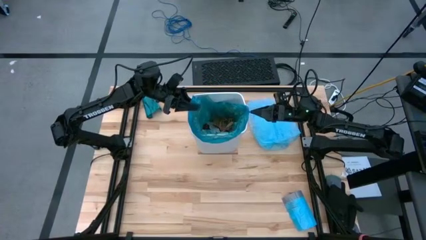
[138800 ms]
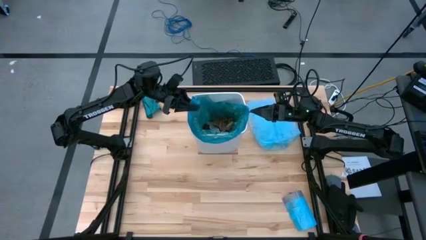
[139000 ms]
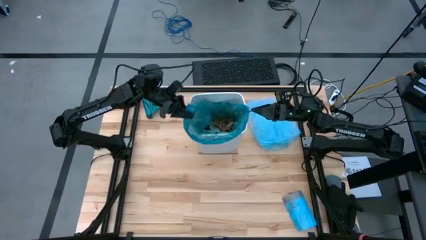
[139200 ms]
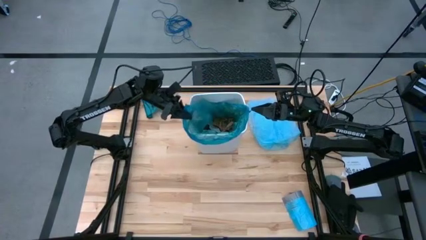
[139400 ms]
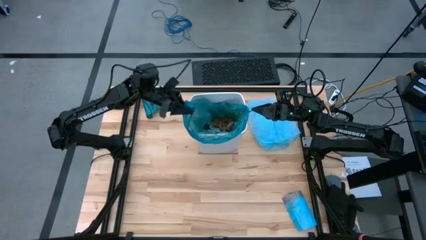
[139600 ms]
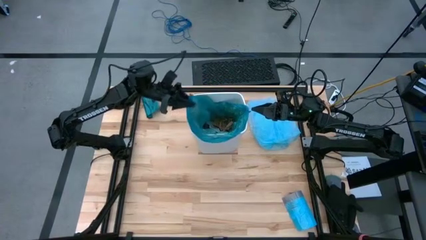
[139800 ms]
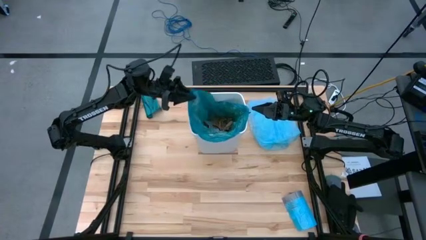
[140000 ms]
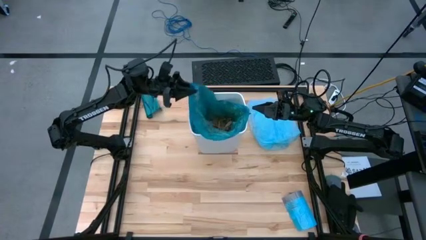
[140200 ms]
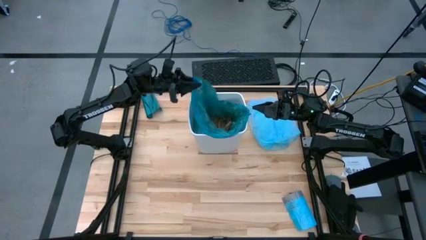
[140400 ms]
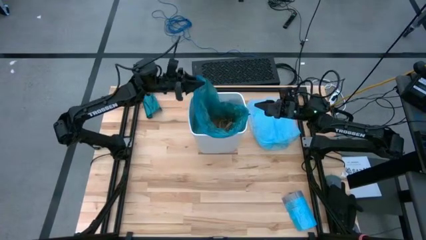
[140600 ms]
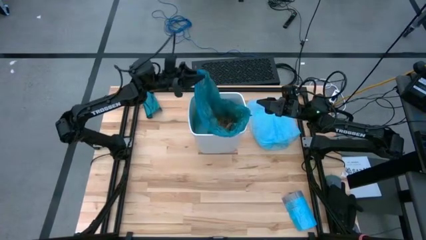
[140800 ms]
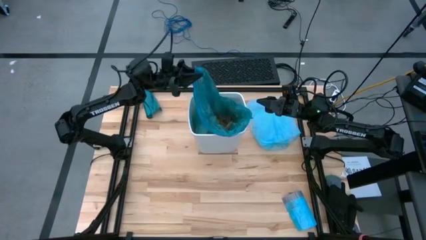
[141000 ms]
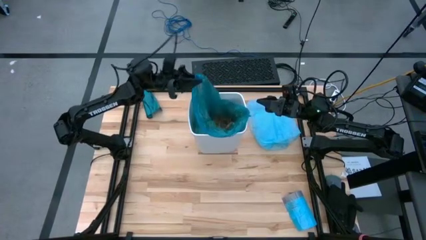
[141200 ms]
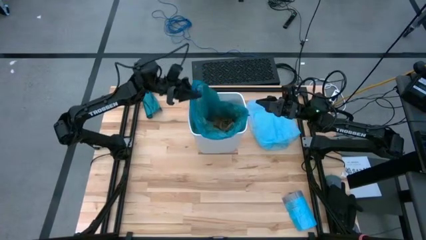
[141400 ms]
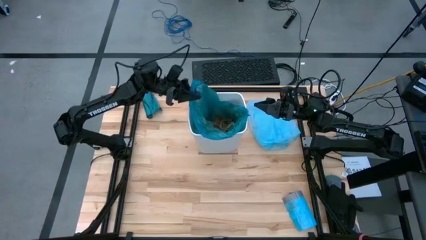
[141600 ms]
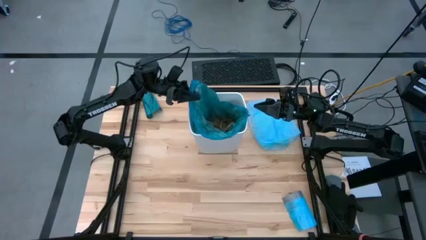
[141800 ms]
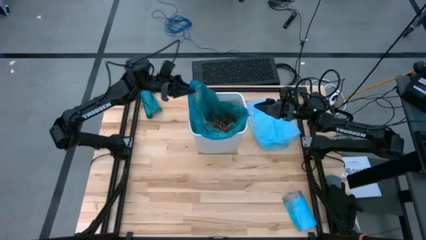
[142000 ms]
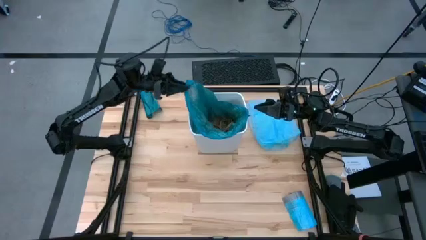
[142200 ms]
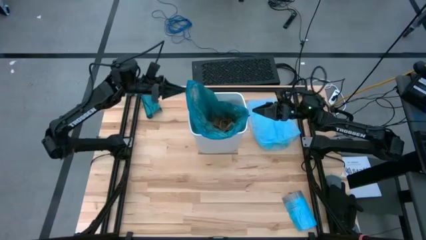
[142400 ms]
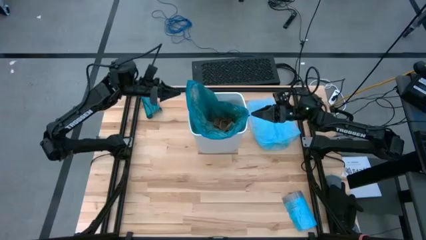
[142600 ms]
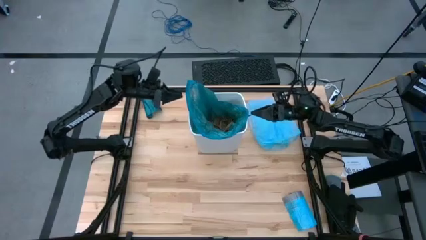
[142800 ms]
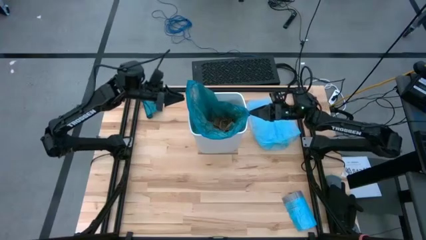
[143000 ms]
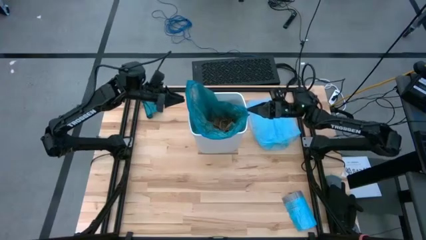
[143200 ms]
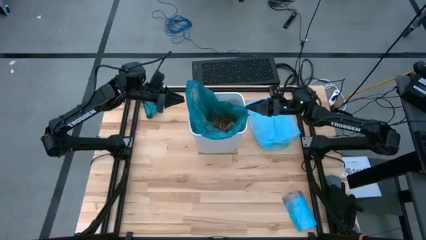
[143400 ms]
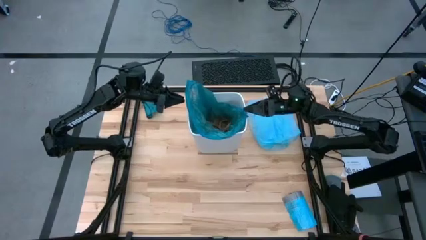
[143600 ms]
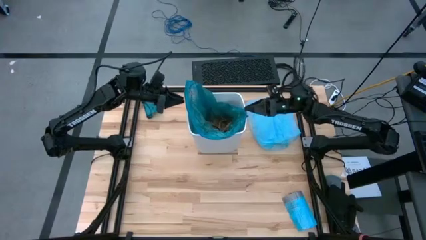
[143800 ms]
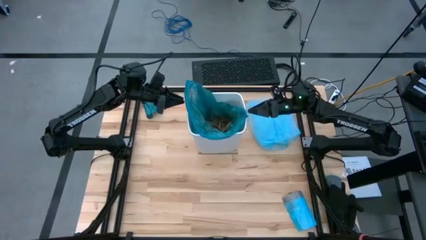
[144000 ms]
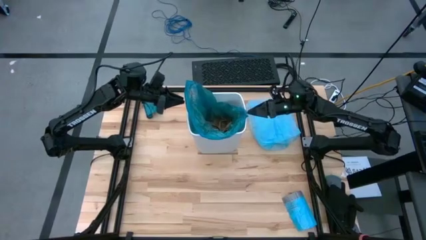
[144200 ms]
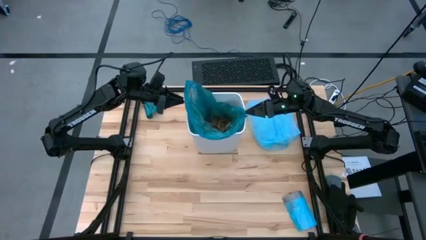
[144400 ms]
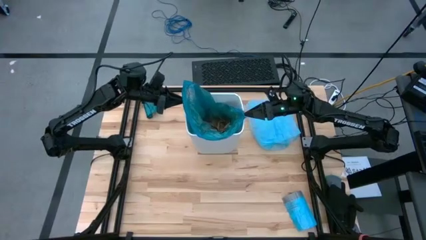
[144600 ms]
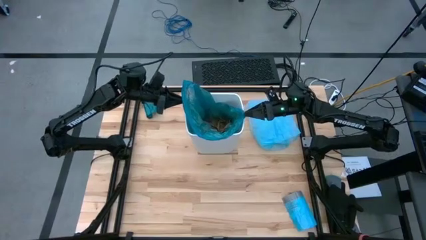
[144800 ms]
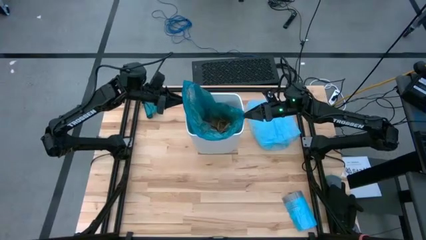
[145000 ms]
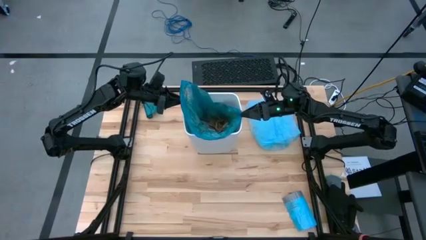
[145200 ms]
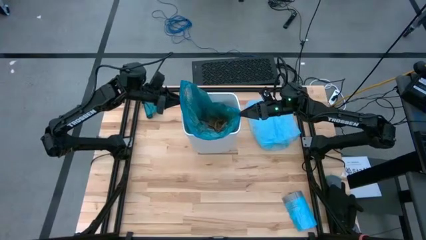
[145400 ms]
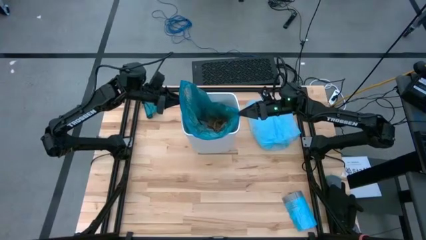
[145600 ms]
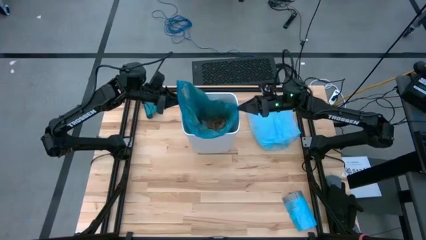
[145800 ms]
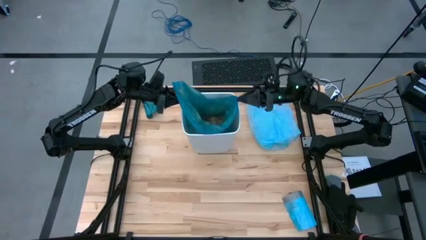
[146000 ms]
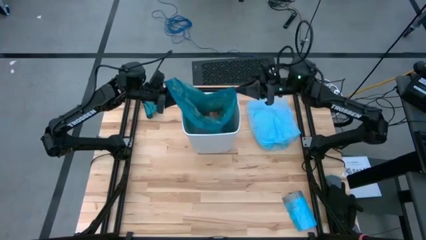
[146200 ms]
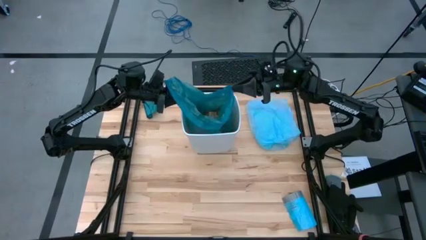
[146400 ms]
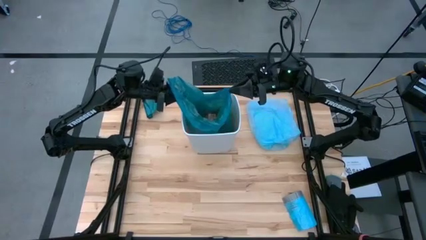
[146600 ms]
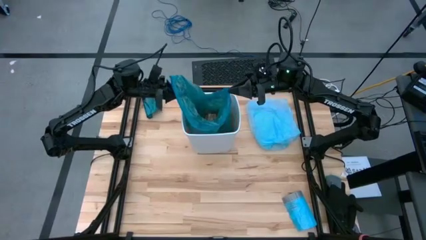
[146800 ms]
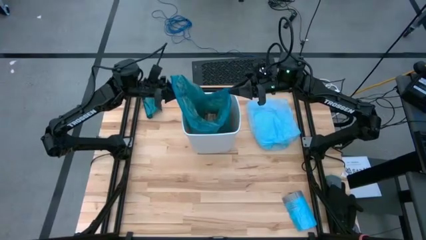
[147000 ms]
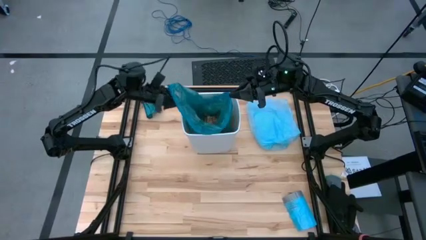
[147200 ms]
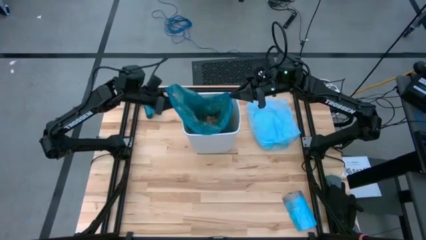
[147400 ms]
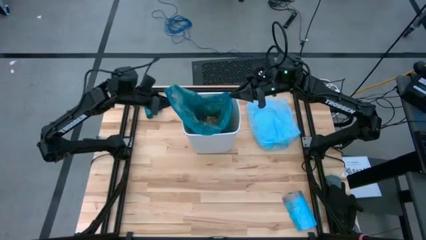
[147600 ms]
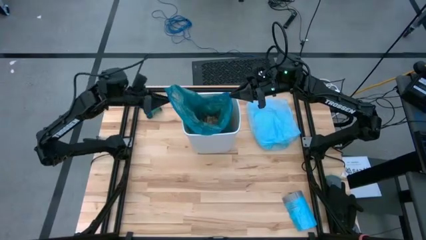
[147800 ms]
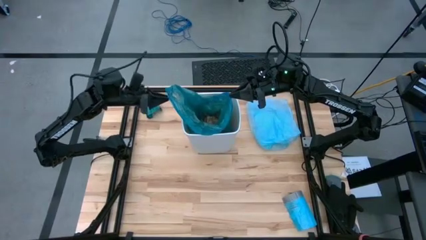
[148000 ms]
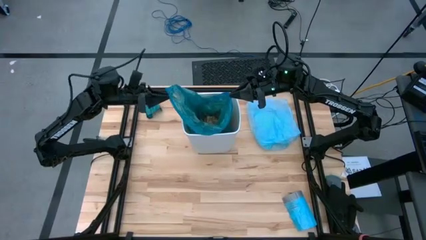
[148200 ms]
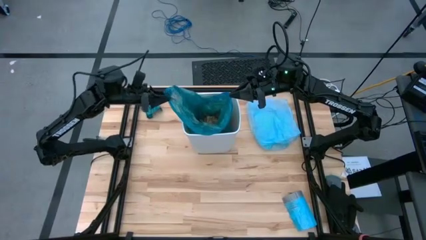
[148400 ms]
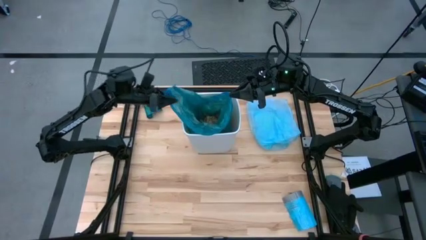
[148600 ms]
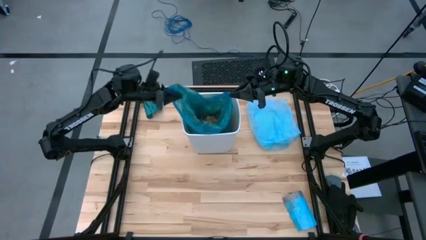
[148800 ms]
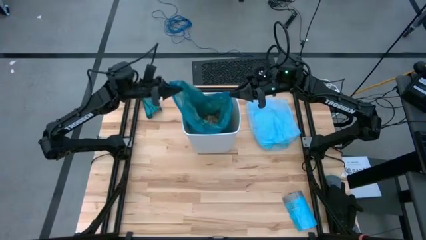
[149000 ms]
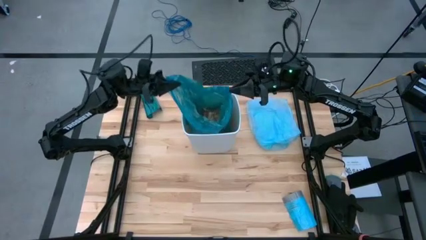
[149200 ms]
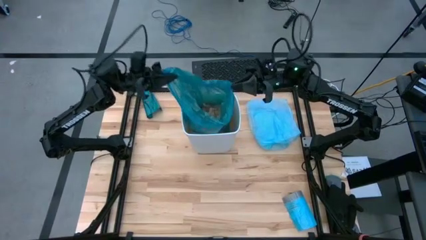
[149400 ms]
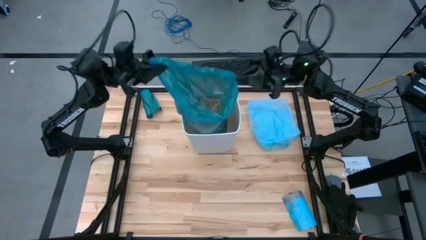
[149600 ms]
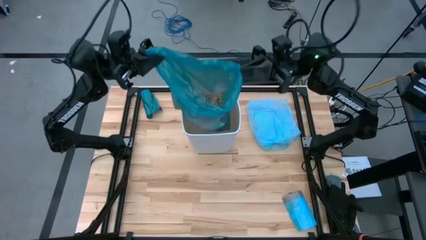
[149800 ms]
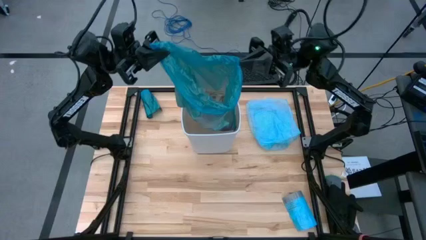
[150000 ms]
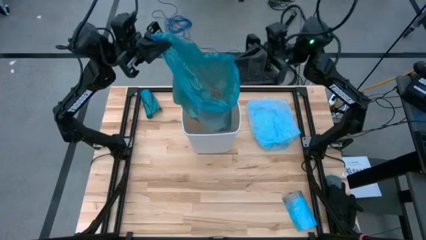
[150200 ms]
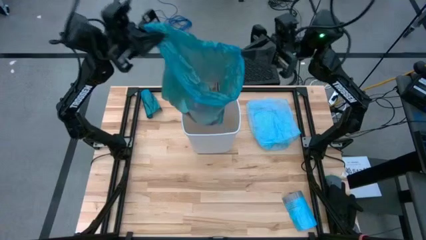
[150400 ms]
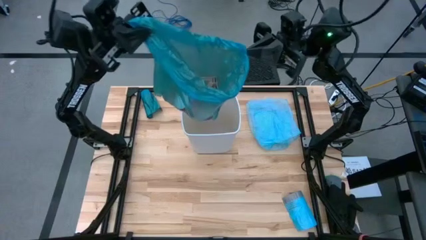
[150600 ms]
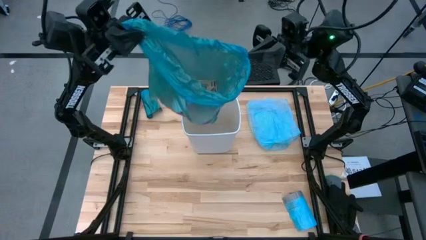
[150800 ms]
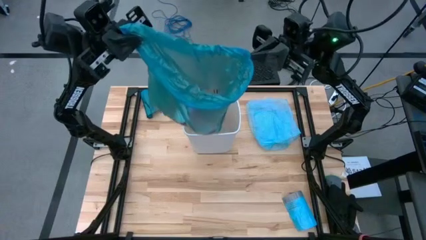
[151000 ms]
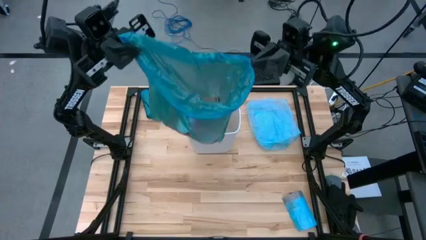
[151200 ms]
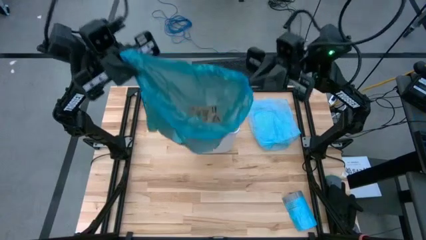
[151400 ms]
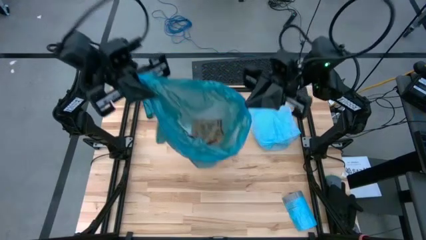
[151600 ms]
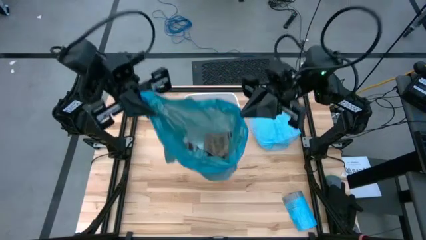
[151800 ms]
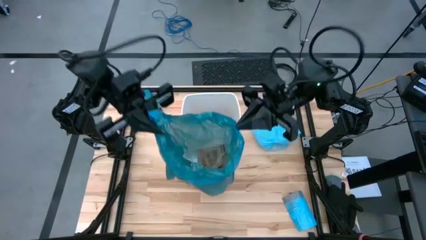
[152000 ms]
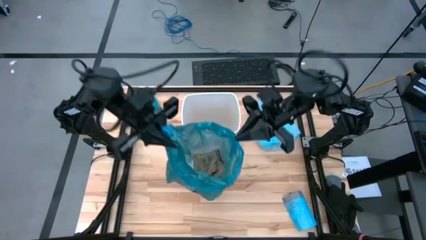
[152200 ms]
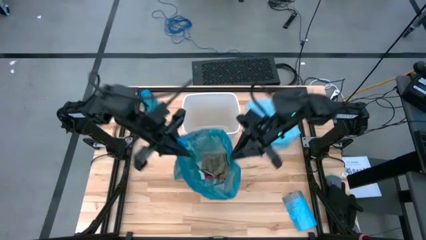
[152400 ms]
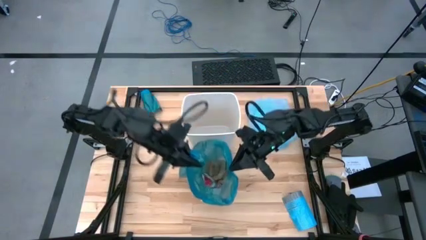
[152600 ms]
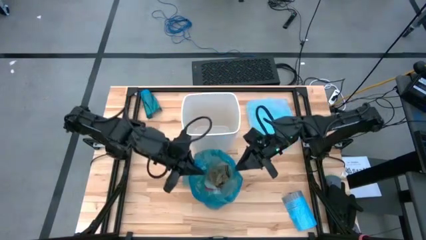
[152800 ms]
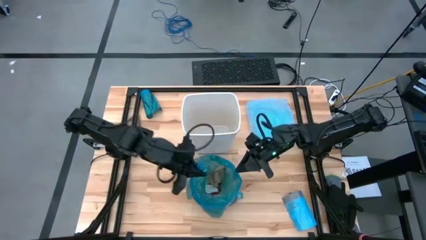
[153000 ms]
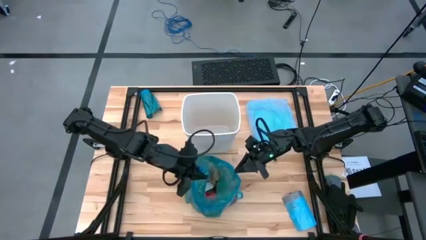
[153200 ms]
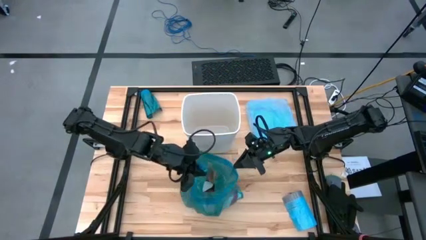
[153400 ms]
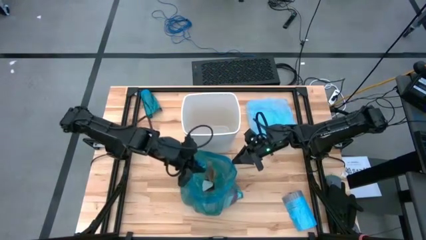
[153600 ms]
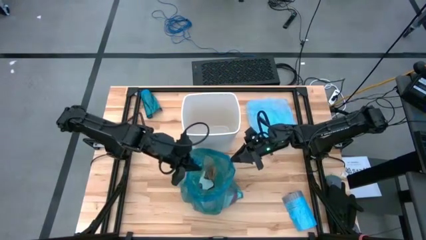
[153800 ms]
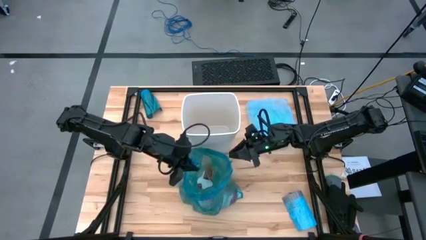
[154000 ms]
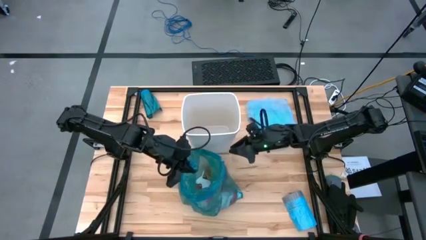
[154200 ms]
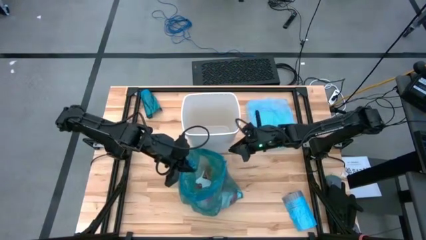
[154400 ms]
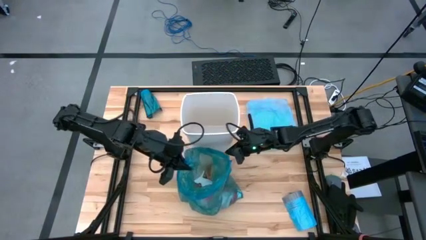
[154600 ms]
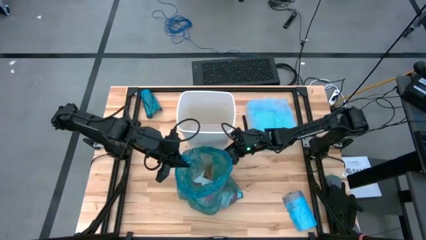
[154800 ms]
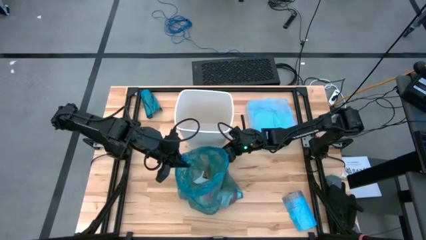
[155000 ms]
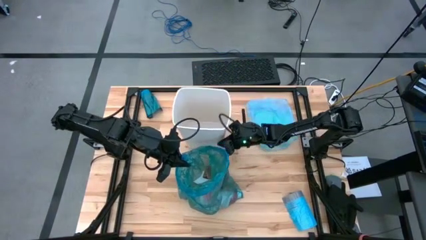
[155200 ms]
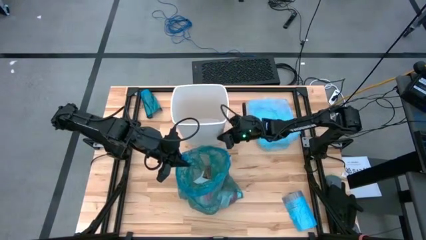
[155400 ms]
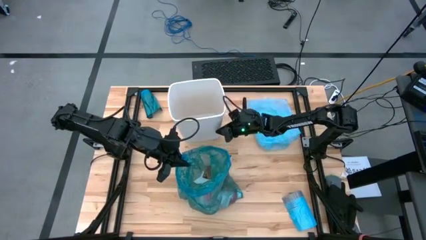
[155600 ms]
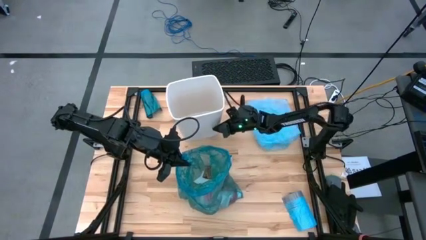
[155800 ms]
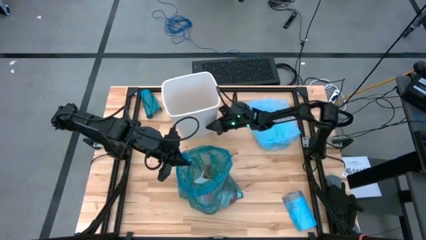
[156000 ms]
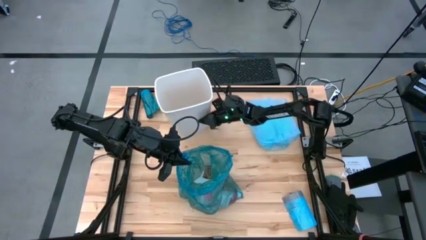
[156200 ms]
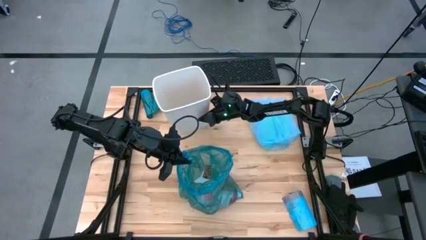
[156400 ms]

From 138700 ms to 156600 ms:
Task: place trash/remove bag and relplace
Remove the blue trash bag from the white trash bin
